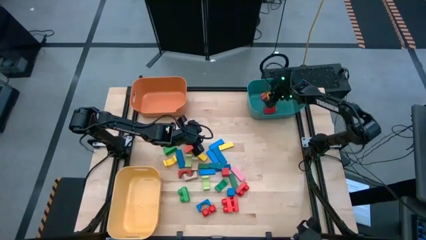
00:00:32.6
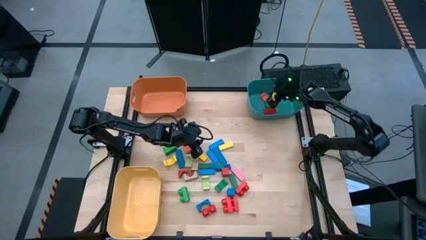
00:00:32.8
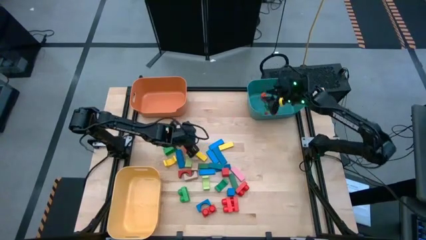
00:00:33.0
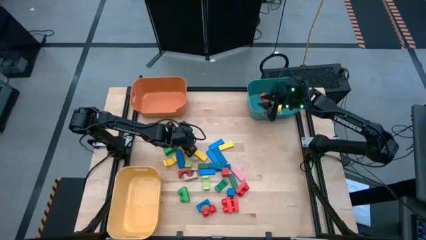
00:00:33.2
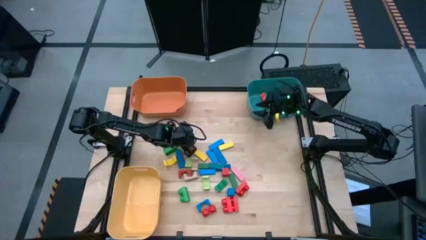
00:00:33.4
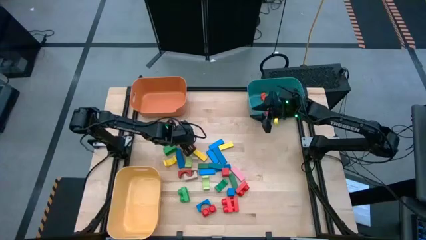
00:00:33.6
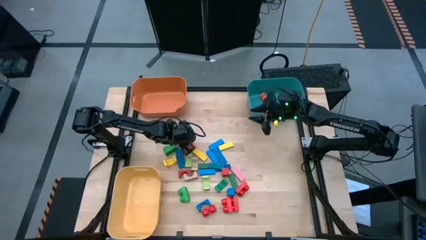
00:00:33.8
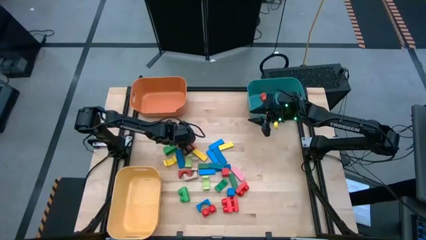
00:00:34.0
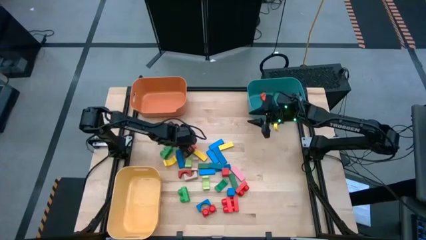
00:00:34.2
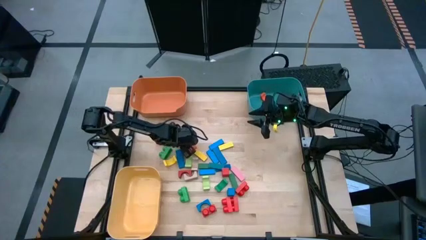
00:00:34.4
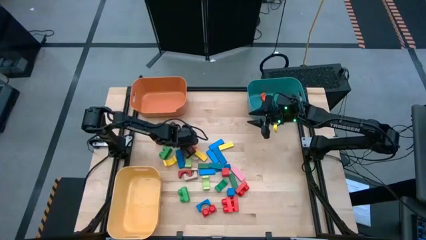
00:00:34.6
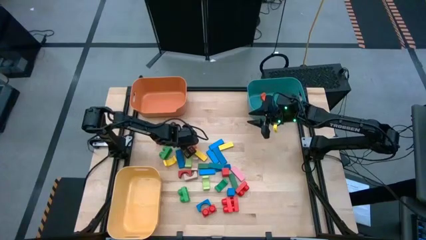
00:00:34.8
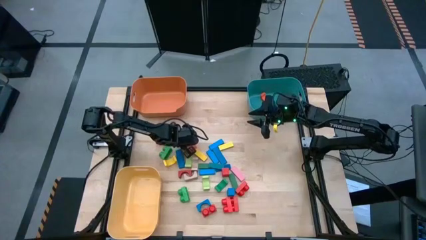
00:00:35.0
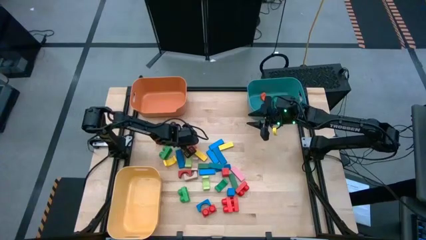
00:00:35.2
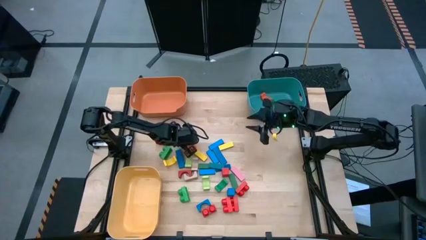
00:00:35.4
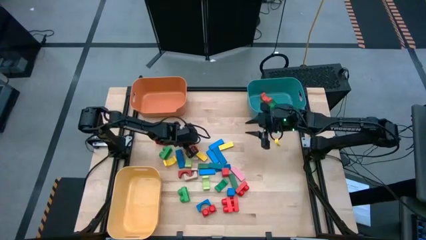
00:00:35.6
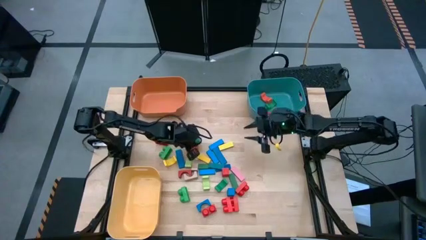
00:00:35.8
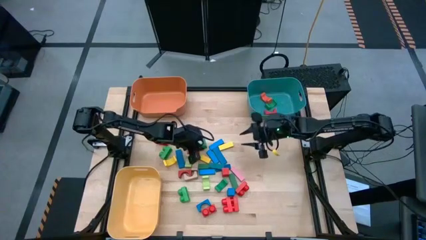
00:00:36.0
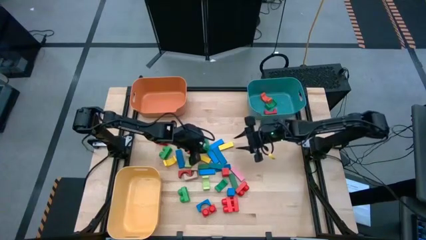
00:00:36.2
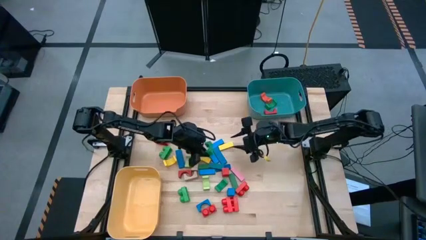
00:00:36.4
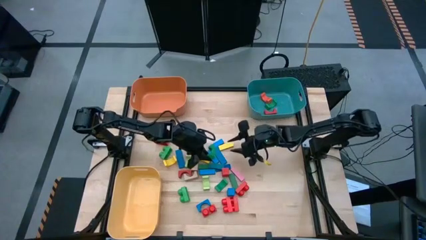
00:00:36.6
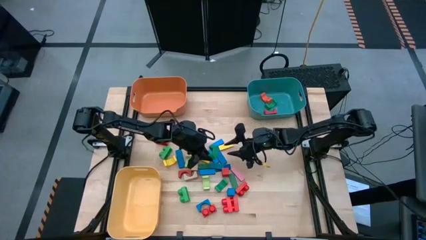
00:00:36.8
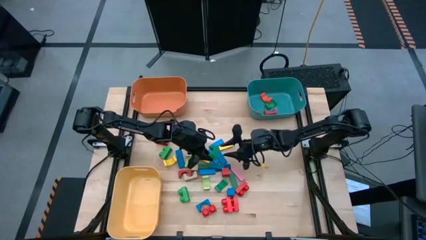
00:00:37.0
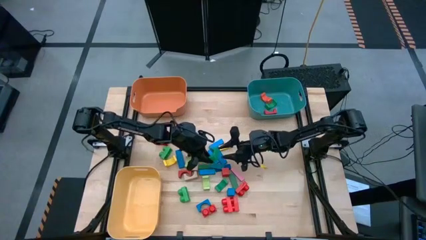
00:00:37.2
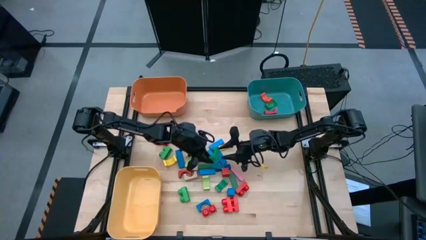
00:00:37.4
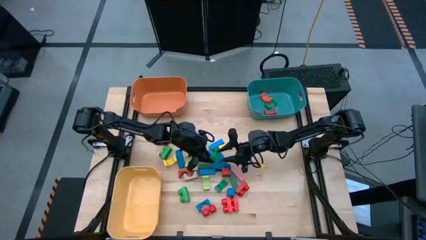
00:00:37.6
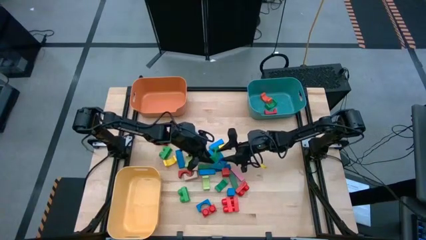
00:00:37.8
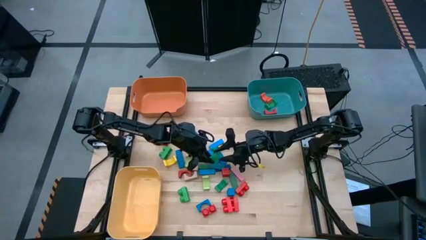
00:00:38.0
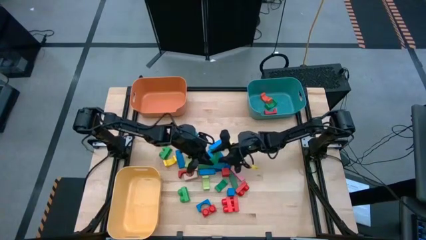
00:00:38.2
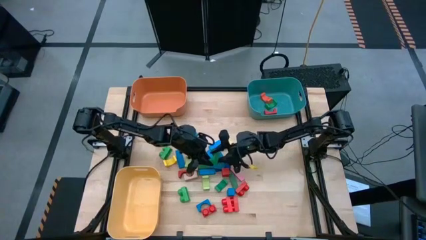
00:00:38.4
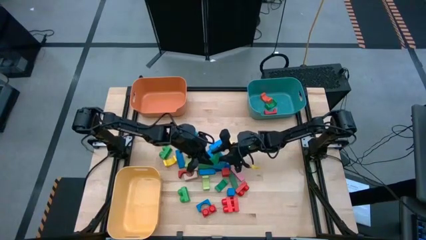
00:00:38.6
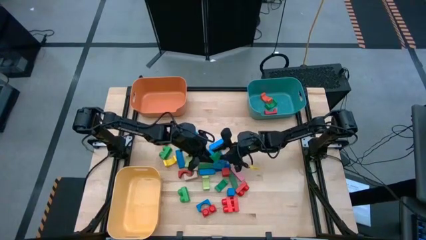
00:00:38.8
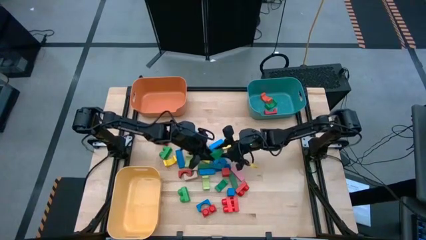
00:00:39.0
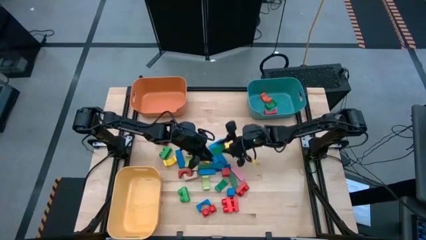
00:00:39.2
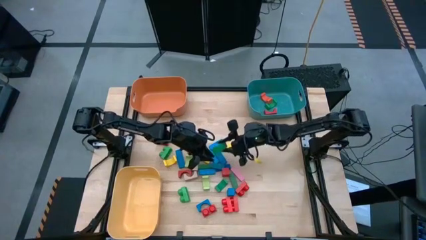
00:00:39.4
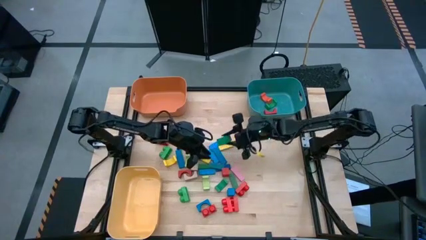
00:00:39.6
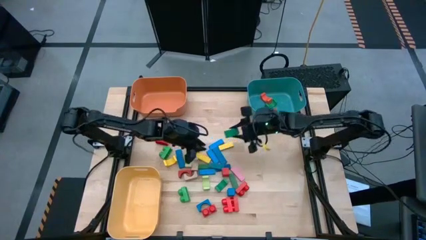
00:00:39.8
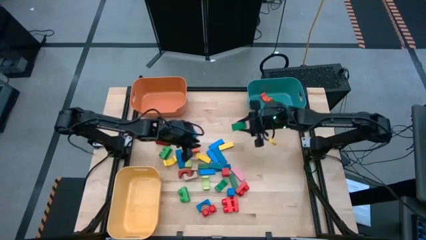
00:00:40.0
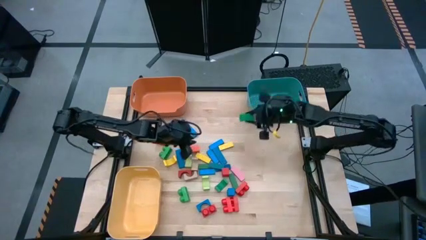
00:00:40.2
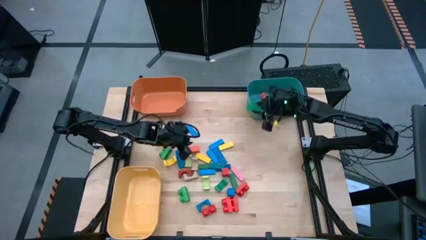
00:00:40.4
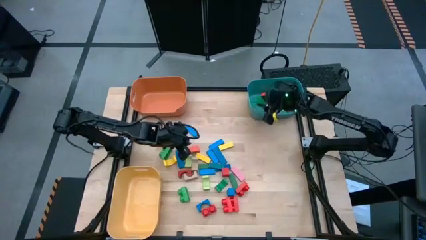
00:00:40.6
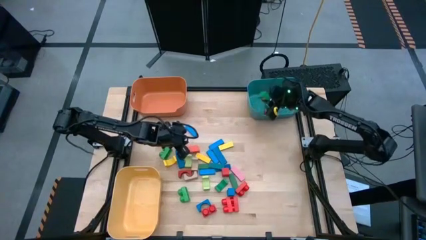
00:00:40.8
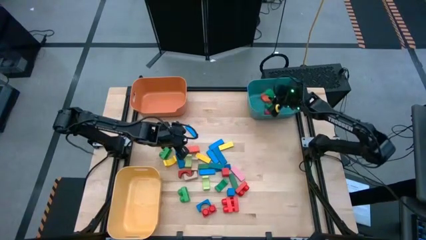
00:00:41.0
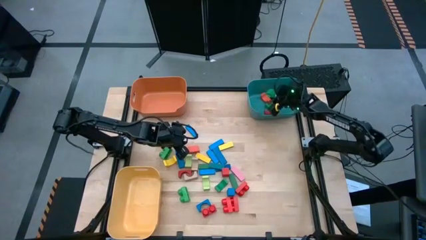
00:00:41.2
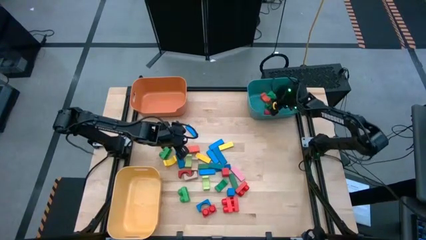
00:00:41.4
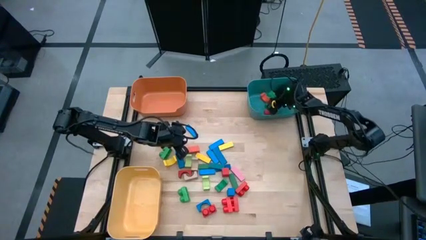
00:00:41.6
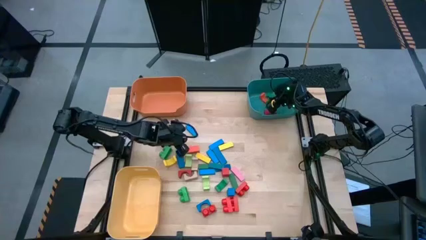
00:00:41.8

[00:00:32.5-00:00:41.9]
Task: Sort blocks by size
Put the green arch block into the blue bin

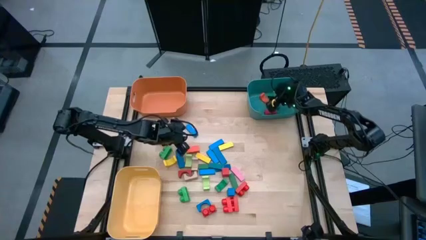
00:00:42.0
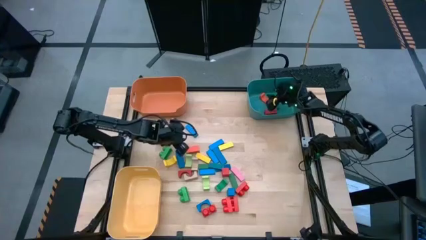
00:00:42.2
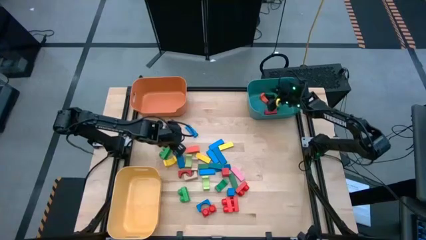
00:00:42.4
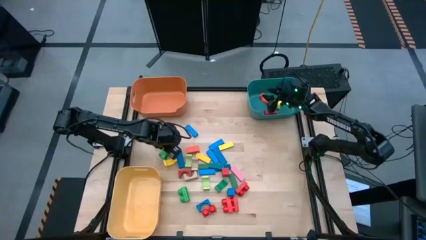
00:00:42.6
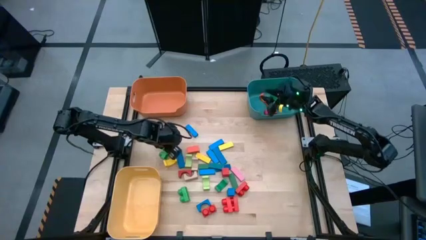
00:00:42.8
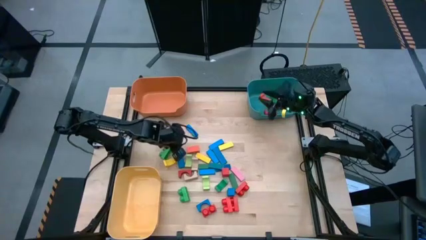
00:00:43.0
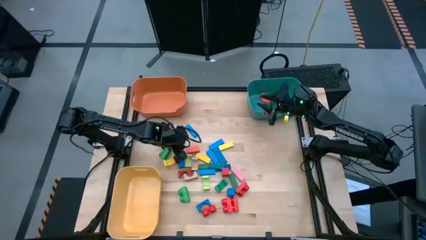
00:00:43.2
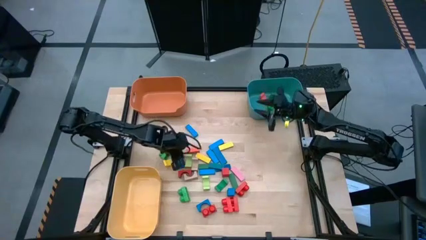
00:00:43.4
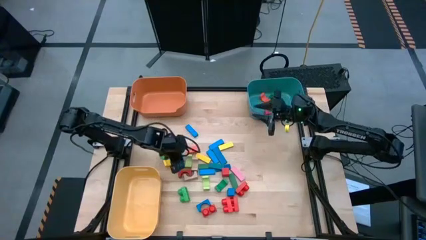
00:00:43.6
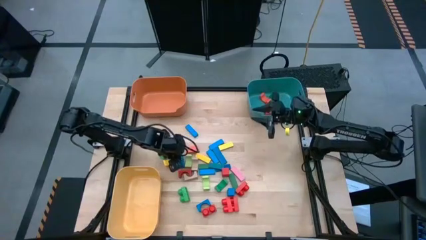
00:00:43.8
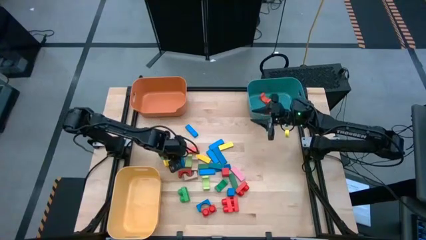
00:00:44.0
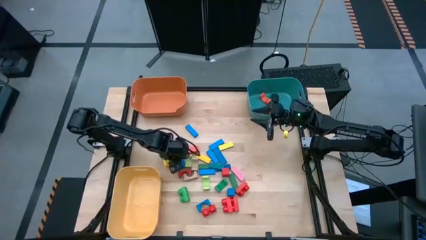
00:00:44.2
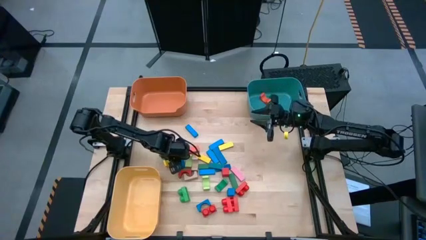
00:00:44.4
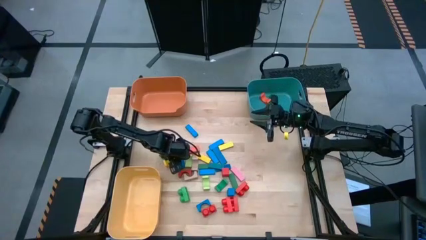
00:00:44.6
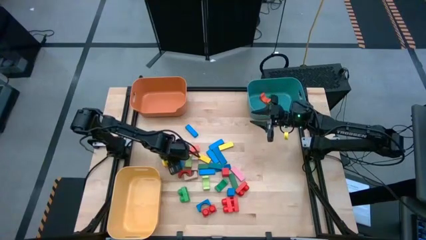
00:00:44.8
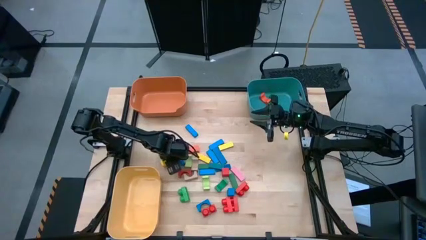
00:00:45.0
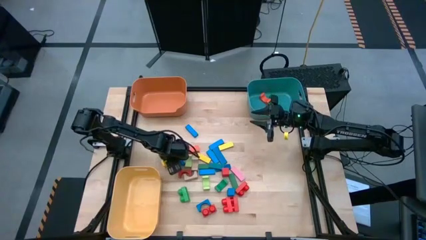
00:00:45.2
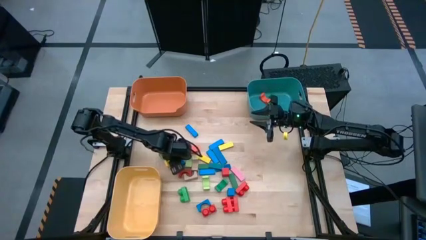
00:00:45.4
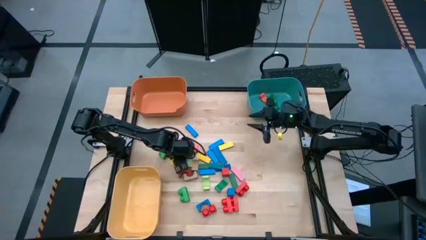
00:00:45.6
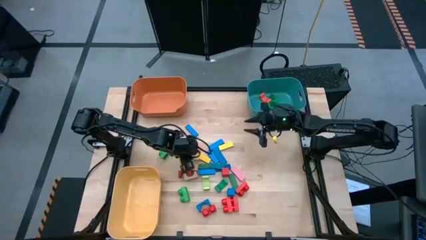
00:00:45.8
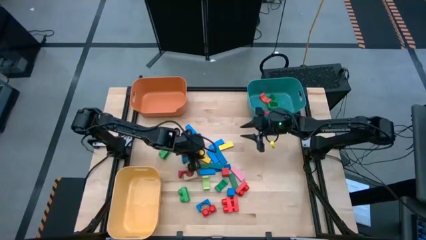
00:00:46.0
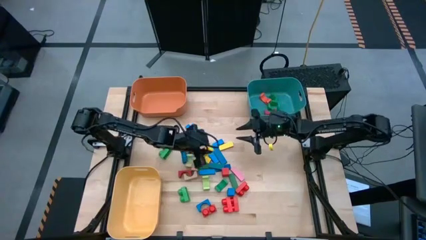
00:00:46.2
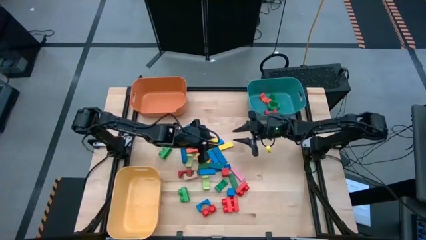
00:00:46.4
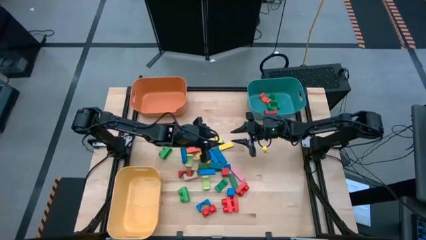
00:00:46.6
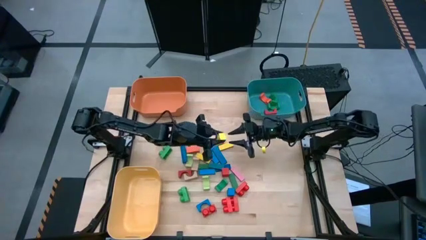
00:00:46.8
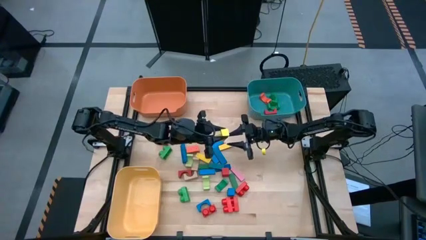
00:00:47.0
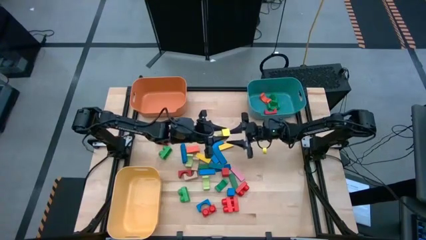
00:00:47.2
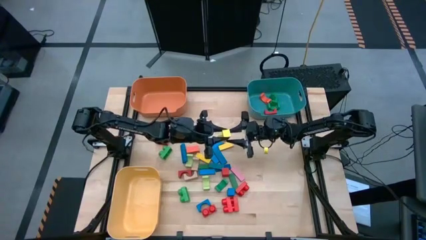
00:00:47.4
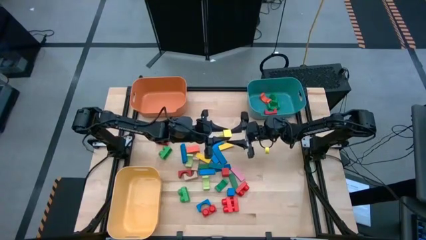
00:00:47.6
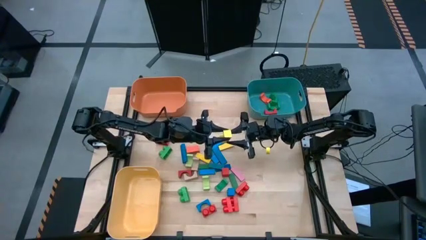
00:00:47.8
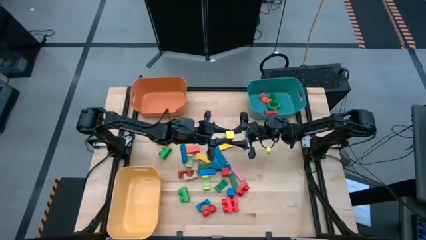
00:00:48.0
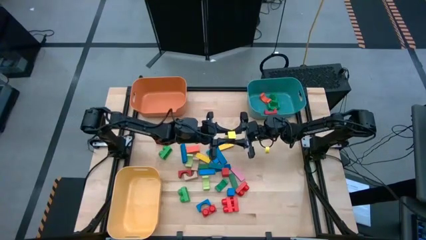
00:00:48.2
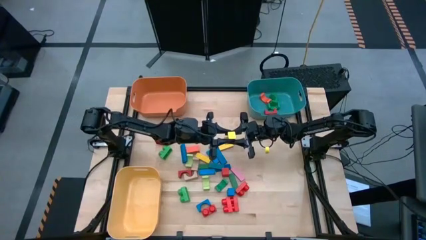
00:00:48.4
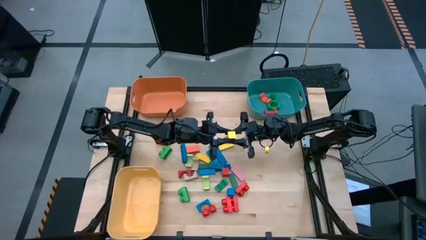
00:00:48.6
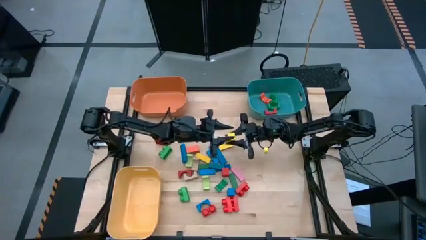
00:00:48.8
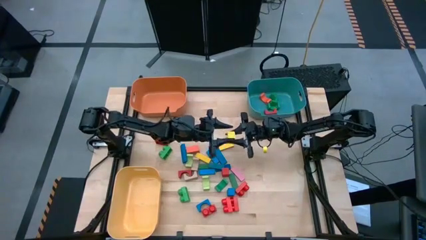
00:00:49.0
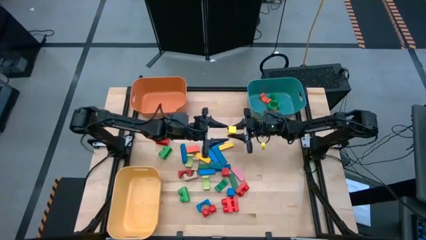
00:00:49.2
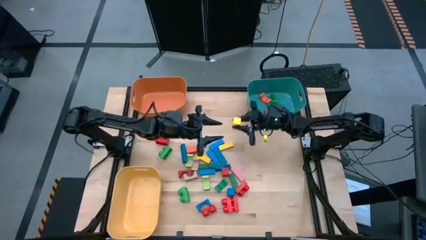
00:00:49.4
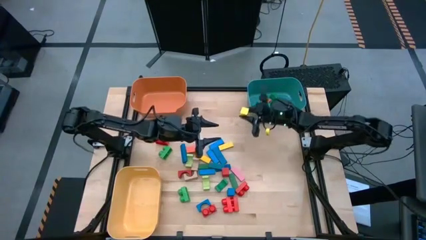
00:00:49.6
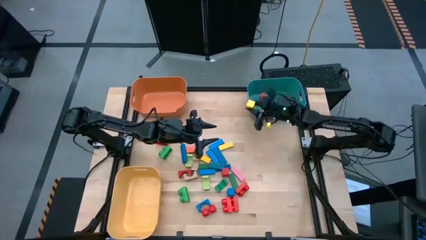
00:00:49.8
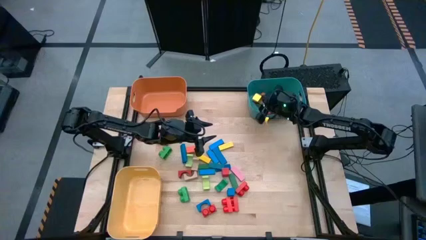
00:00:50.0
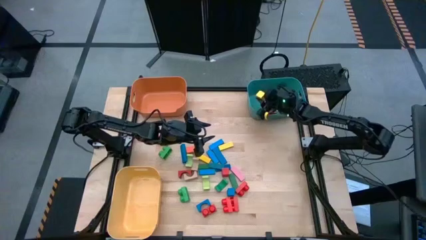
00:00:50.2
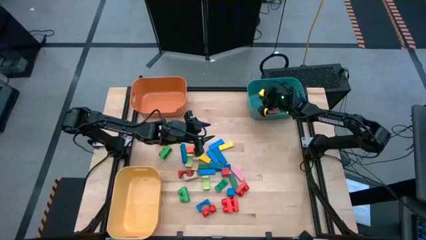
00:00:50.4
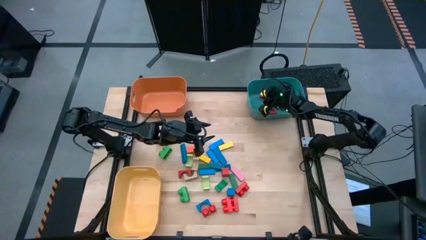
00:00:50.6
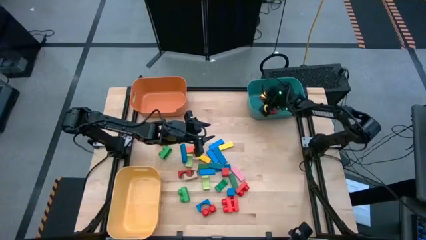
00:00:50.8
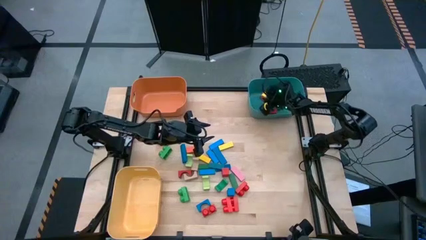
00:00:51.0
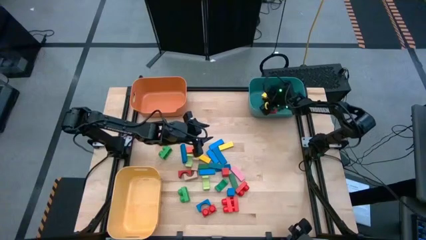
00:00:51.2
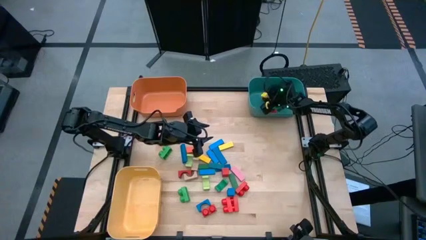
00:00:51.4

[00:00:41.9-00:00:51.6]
Put the yellow arch block into the blue bin
